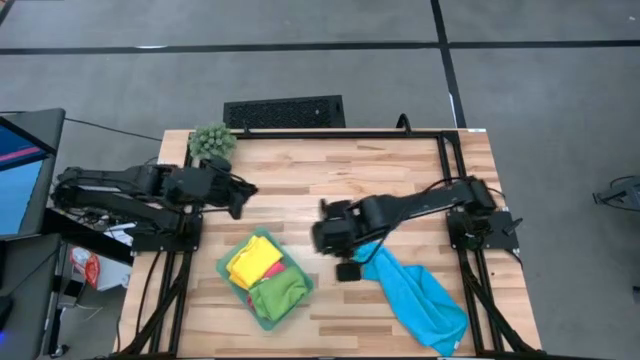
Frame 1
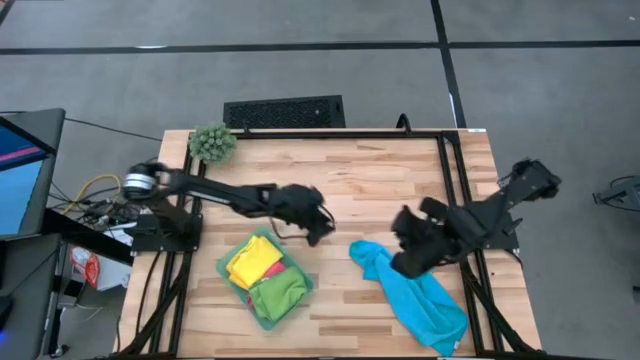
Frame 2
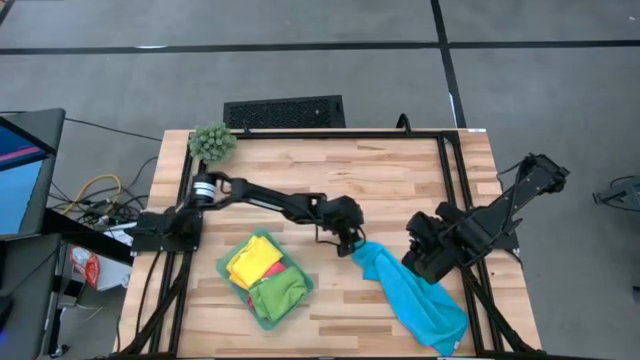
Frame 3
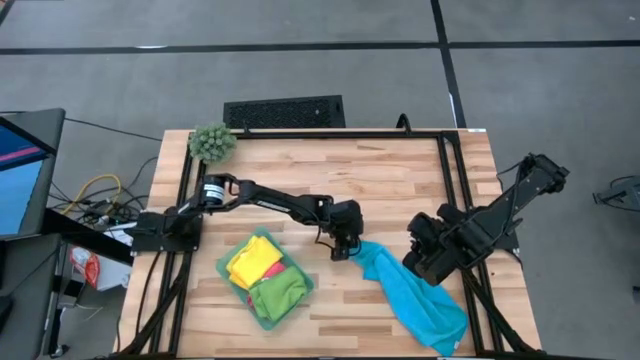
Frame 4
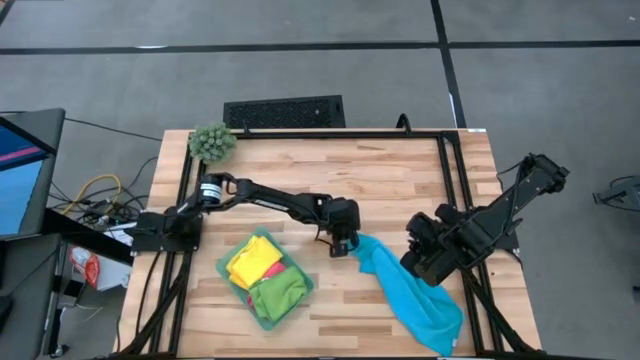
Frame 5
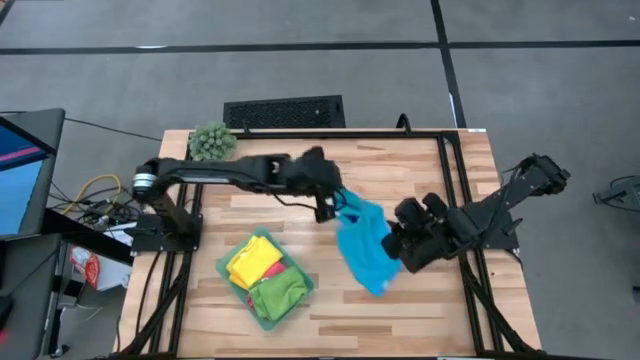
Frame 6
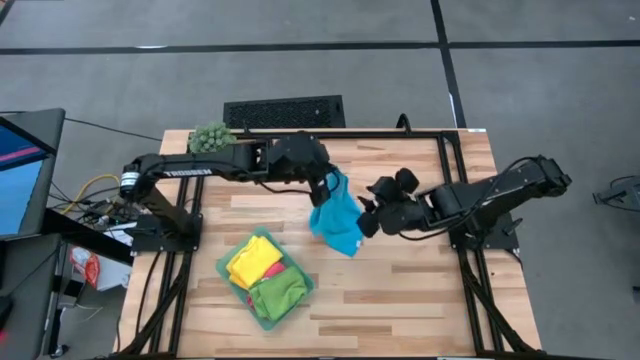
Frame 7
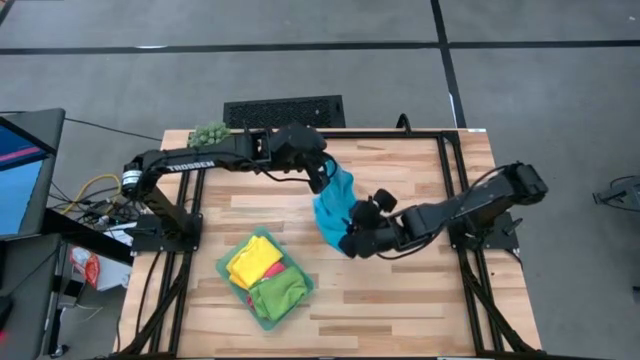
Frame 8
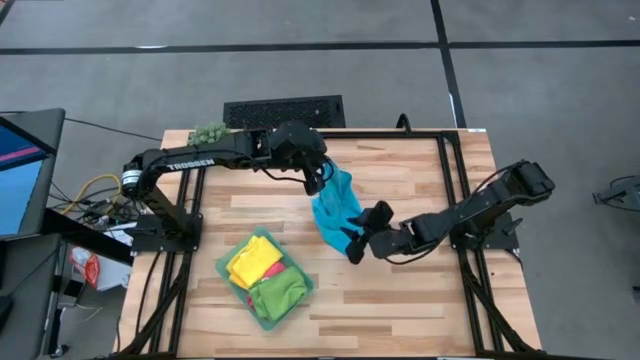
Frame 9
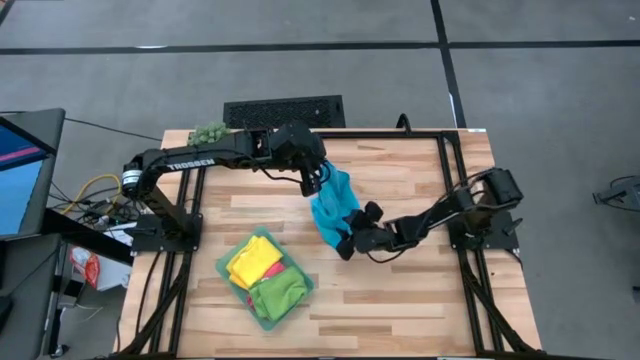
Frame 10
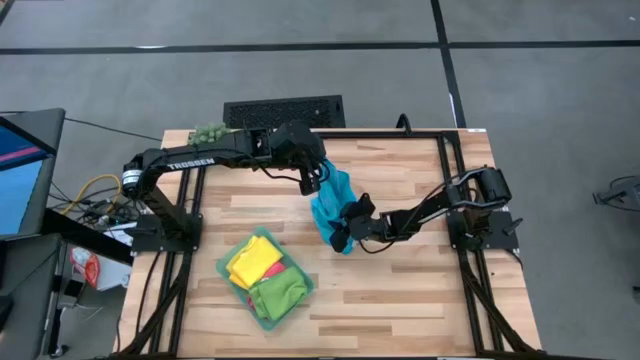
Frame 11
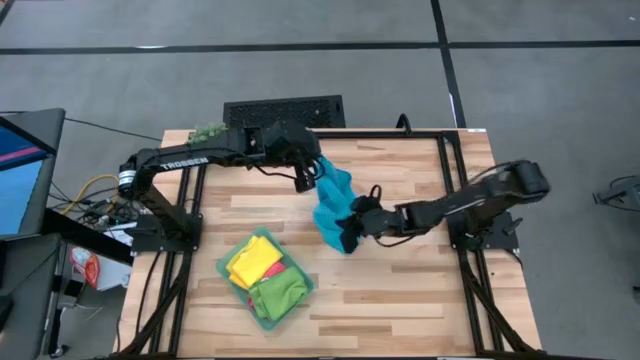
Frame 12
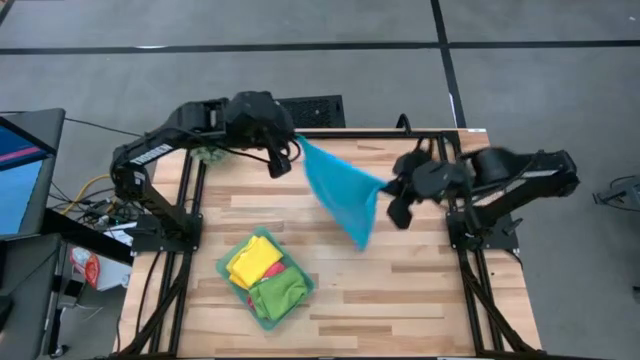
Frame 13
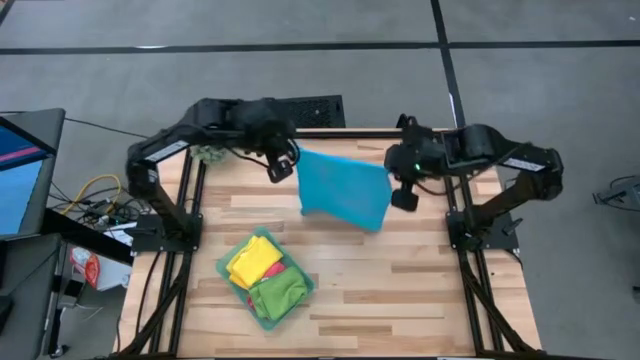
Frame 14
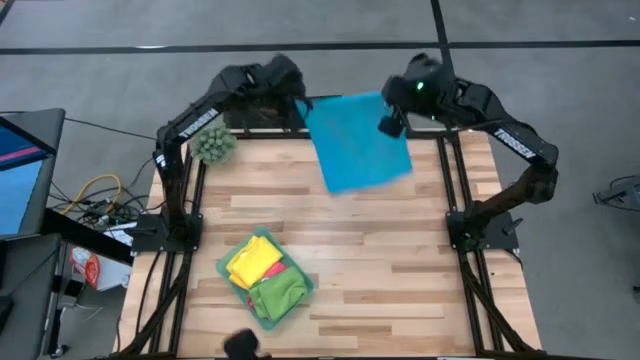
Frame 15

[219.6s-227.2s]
Task: Fold microfiber towels
Fold the blue towel

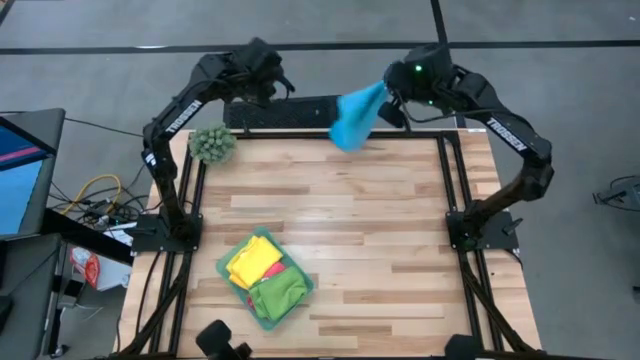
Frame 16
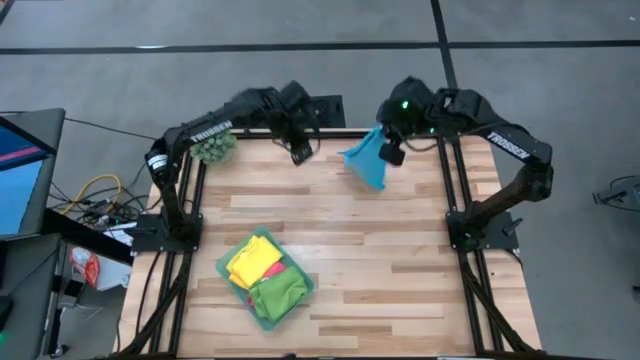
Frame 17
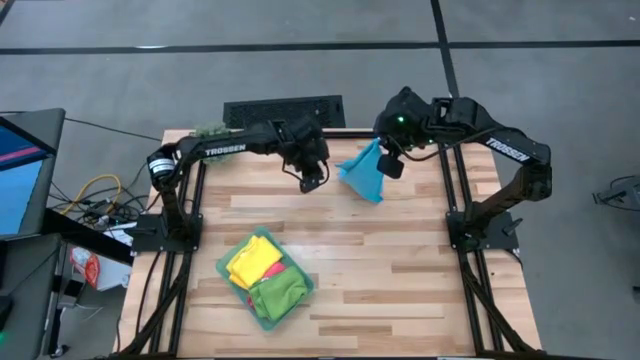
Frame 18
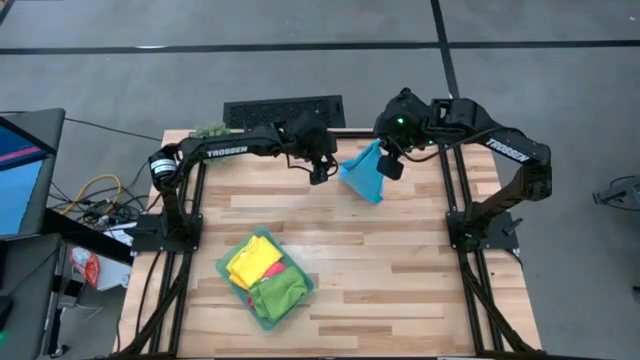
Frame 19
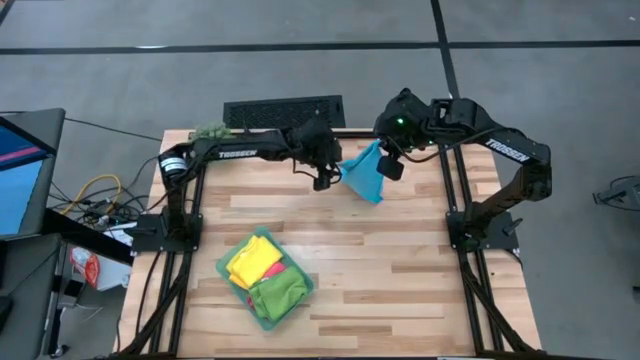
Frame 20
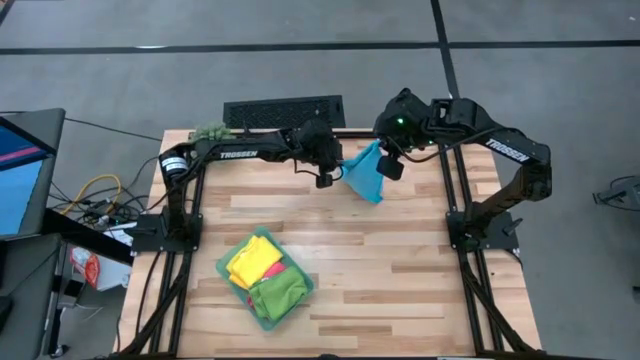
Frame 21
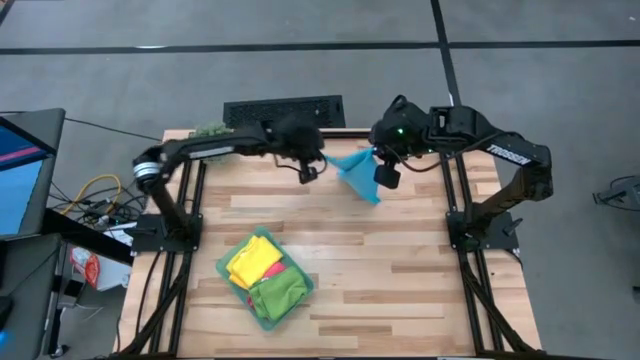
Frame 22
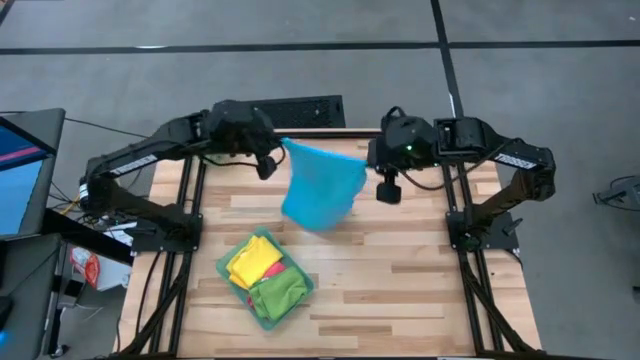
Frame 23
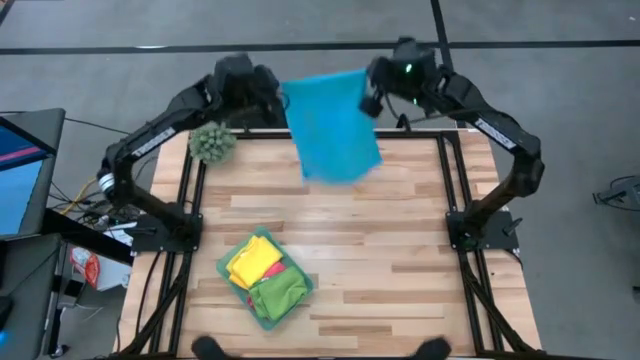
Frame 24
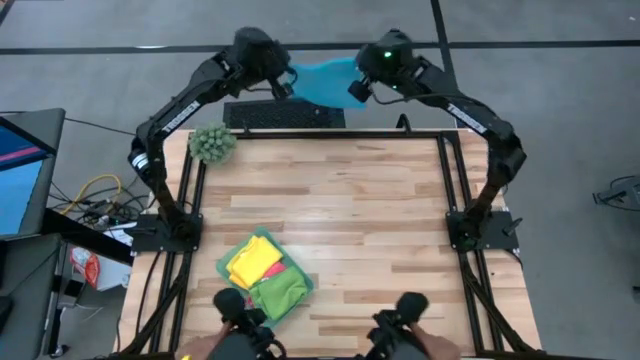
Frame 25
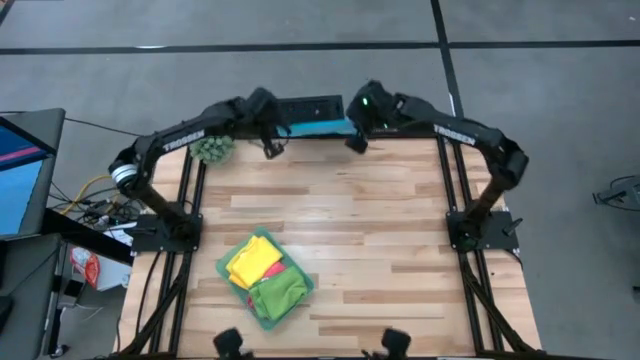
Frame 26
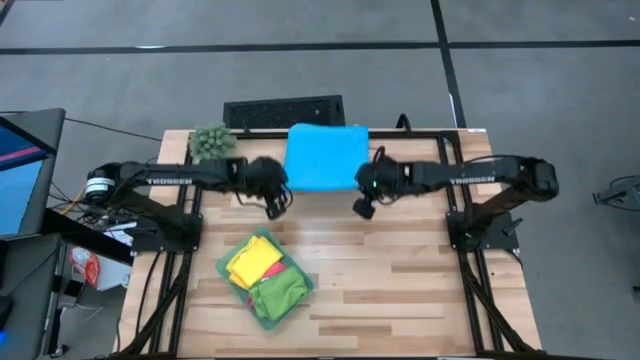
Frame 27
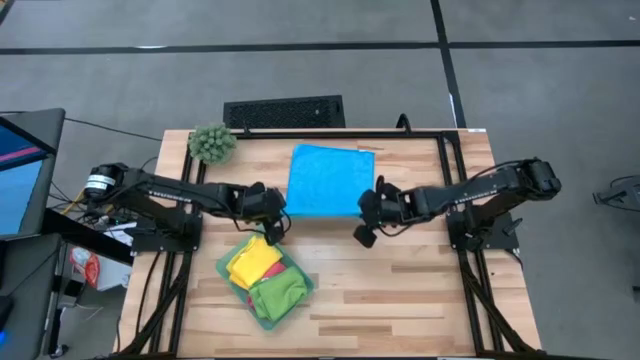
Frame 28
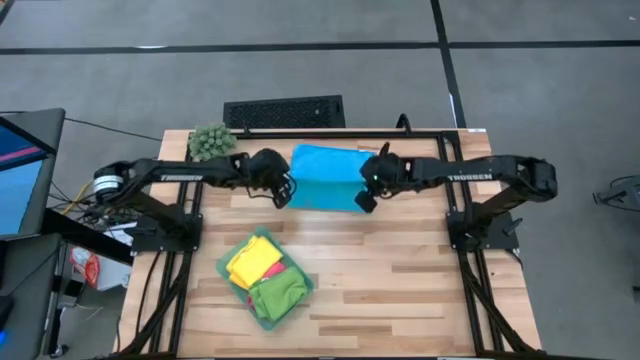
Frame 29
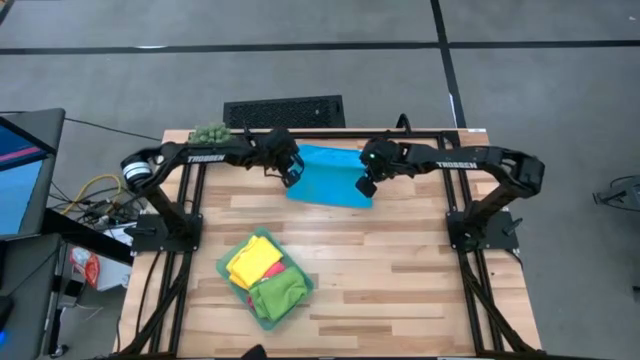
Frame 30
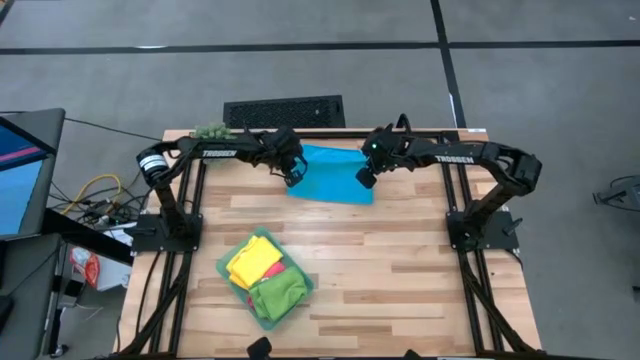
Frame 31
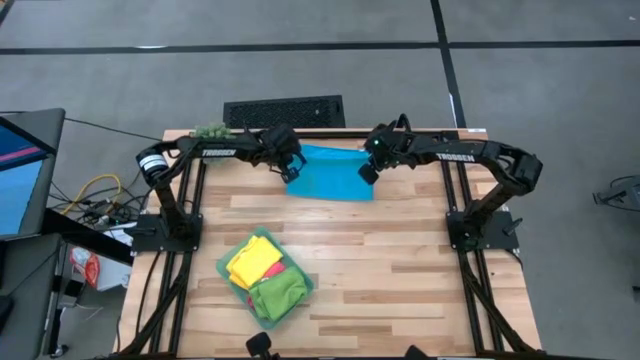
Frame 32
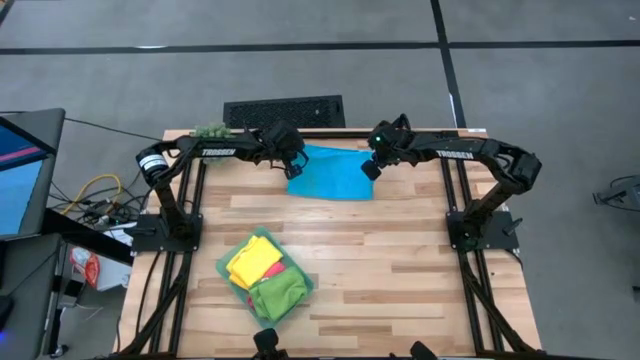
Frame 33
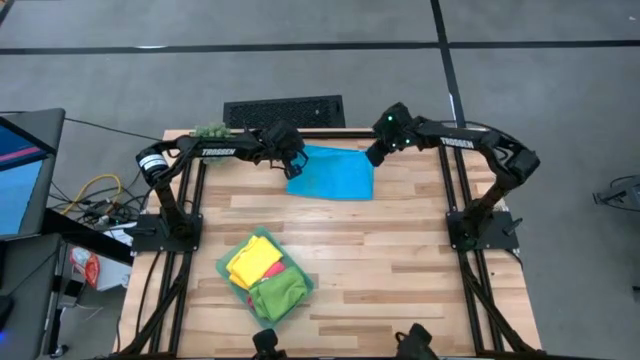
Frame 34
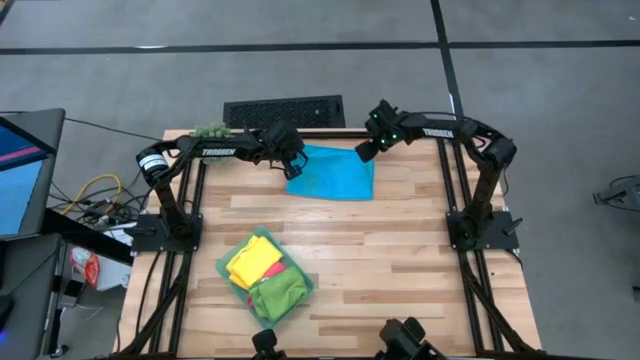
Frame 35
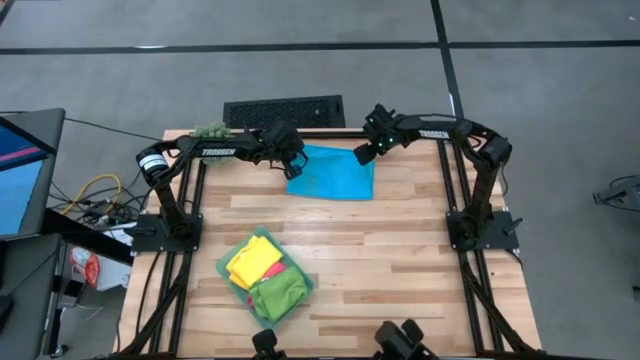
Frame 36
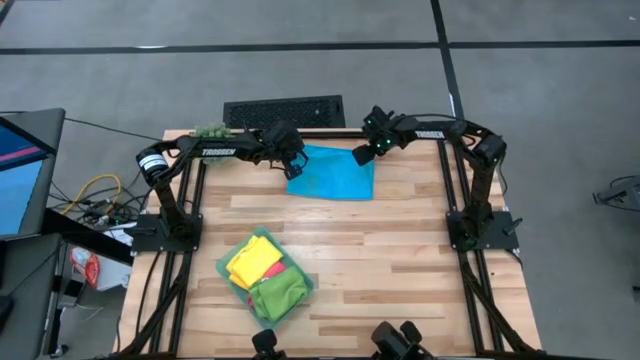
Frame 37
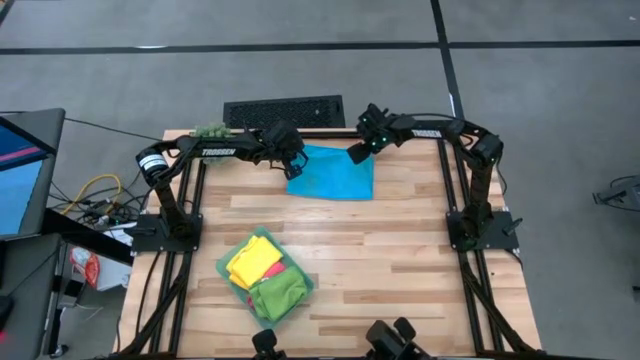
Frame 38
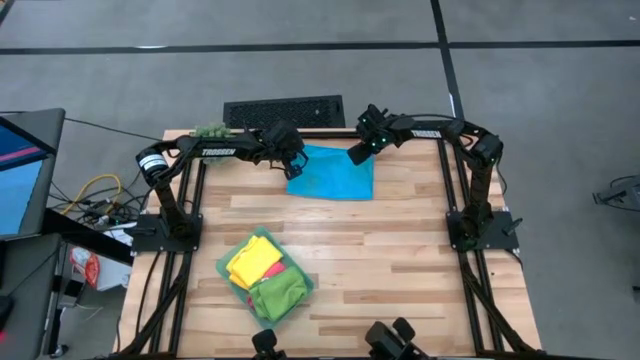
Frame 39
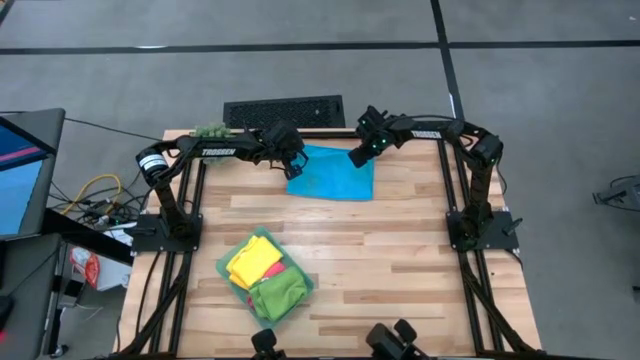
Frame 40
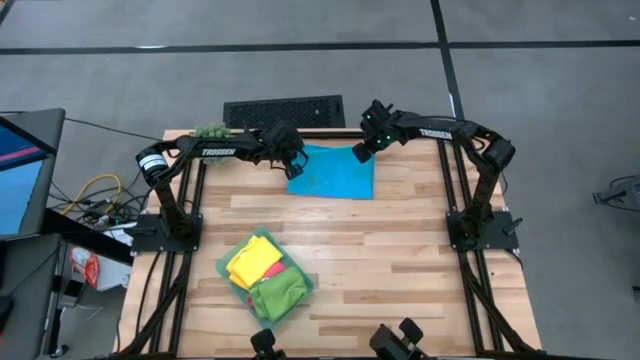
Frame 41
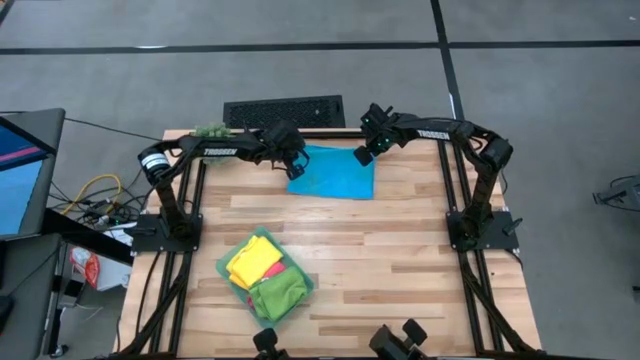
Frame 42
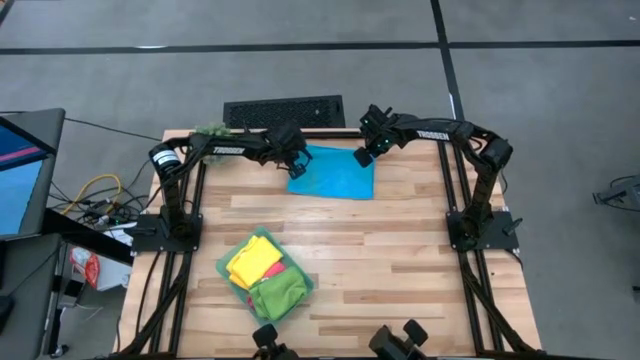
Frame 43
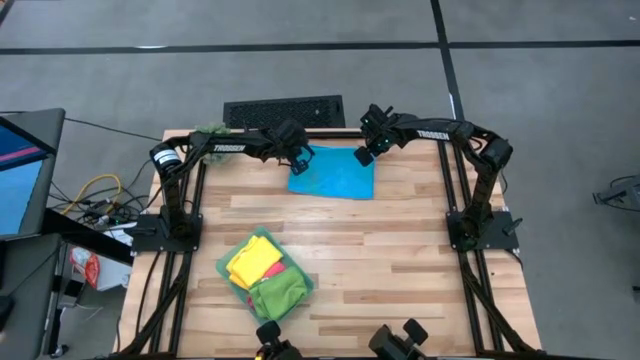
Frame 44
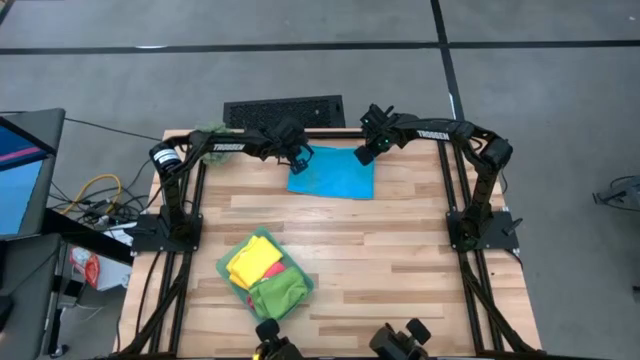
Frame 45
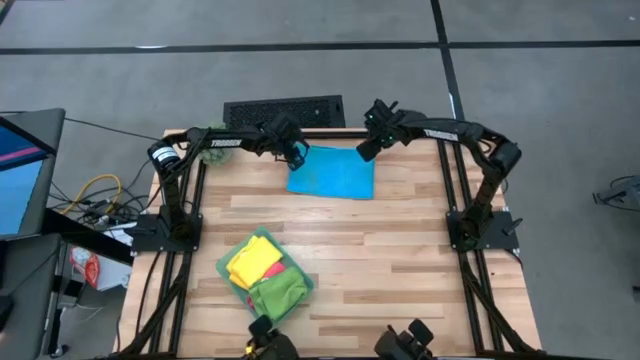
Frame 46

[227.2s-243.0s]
Fold the blue towel
